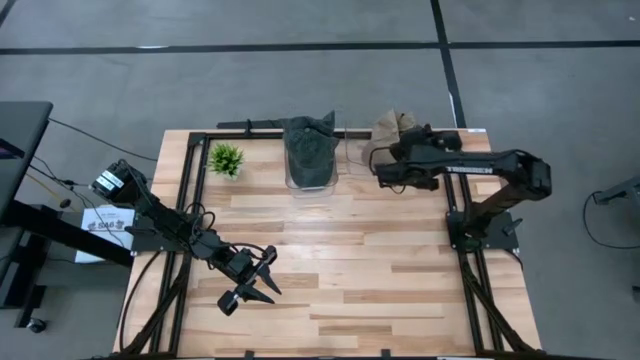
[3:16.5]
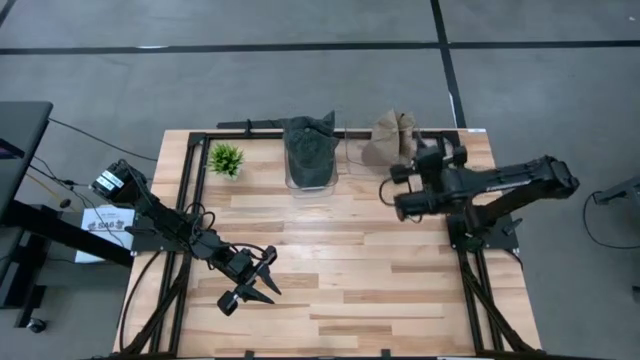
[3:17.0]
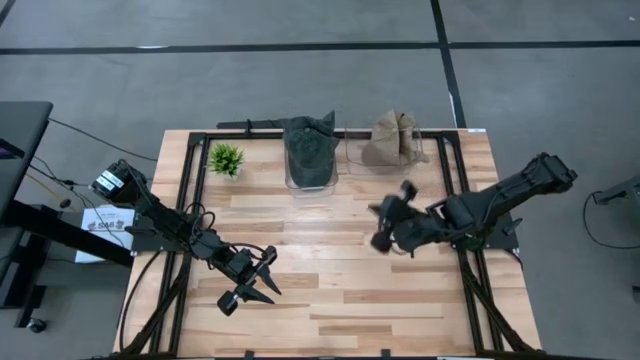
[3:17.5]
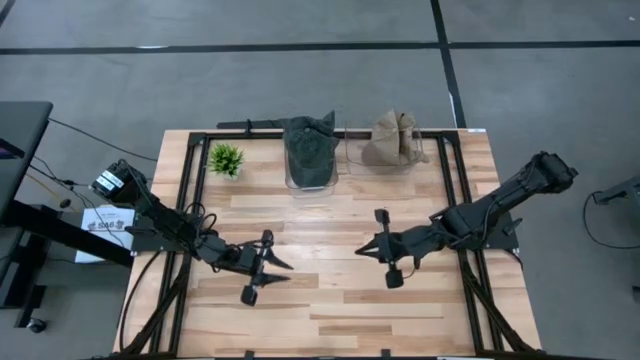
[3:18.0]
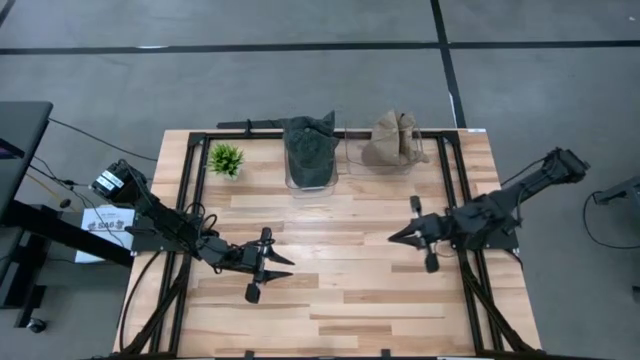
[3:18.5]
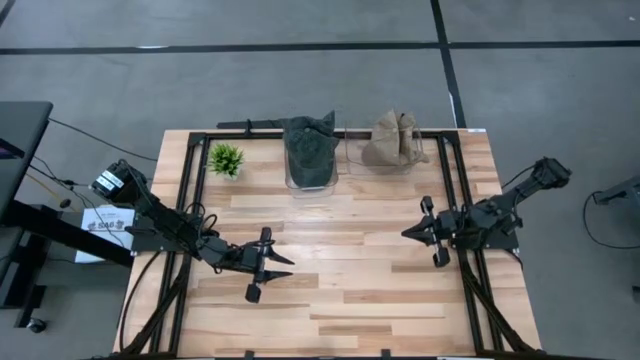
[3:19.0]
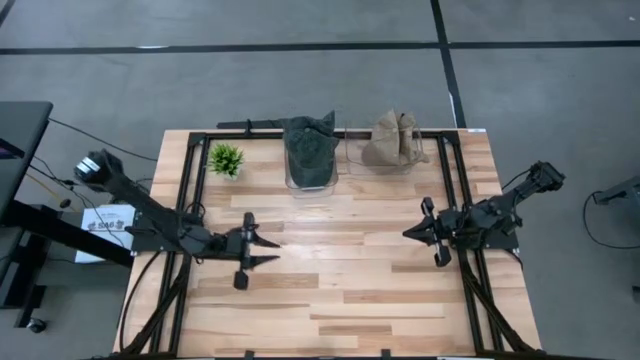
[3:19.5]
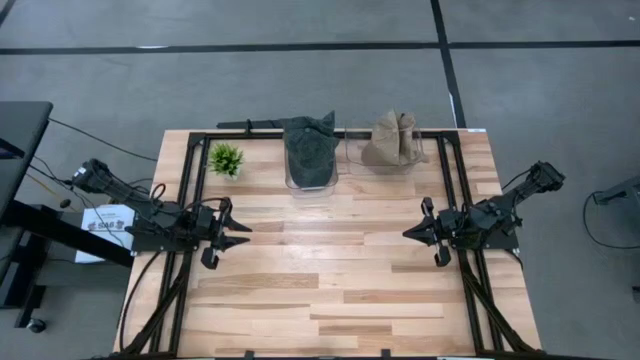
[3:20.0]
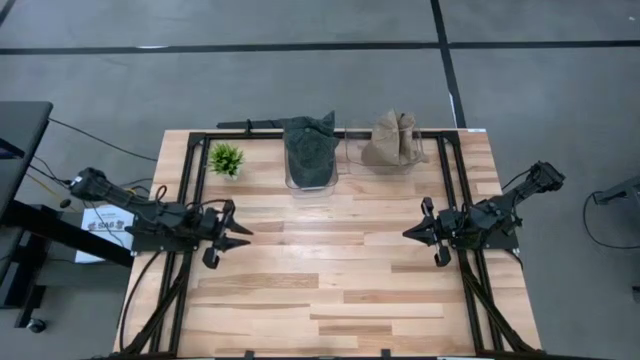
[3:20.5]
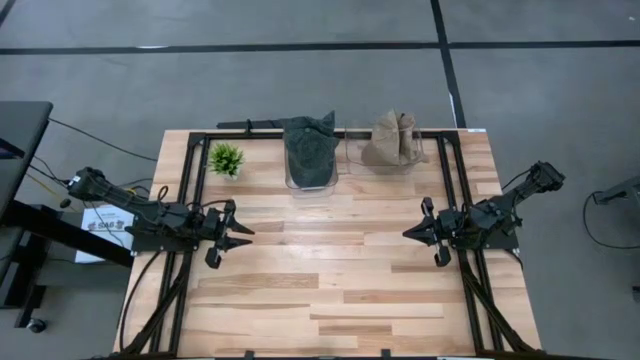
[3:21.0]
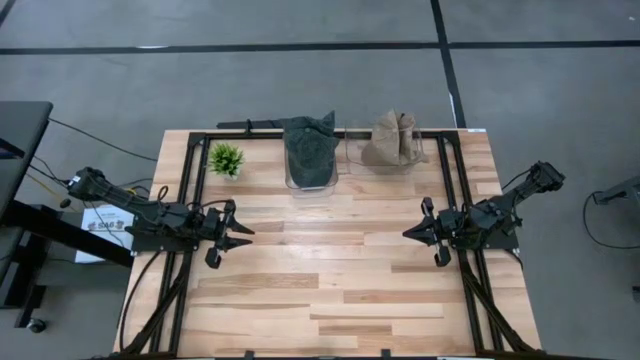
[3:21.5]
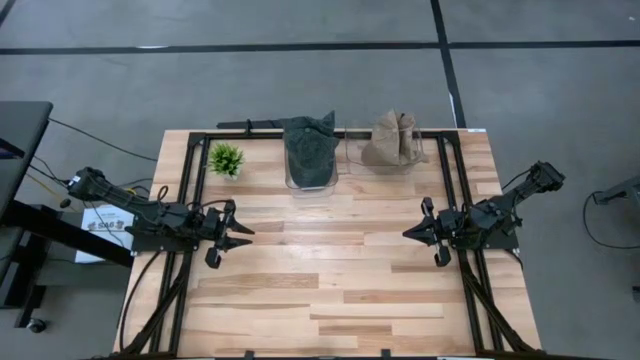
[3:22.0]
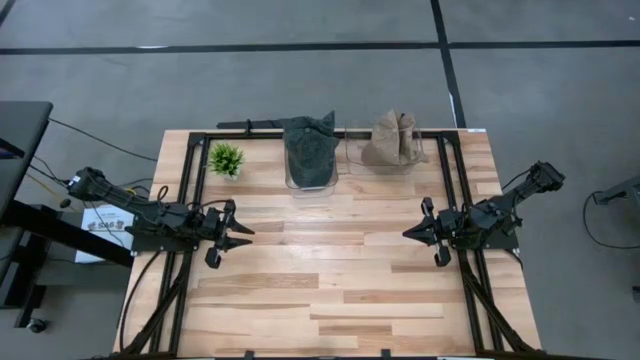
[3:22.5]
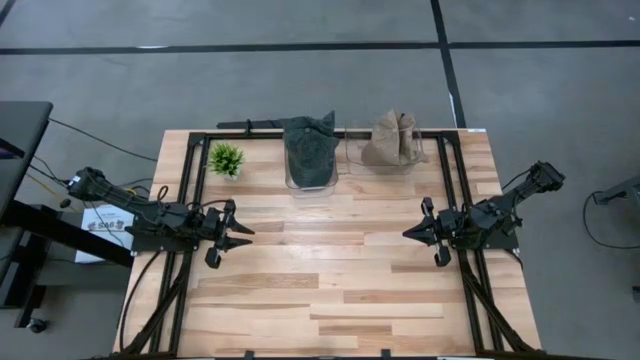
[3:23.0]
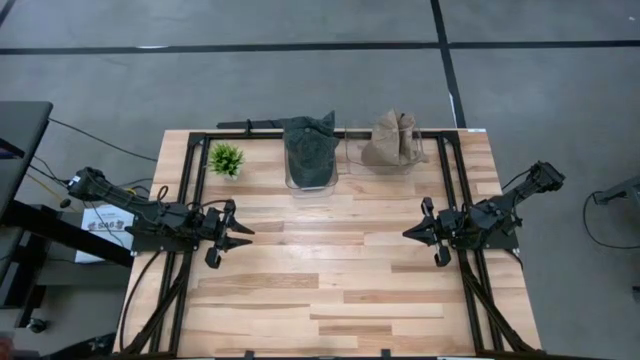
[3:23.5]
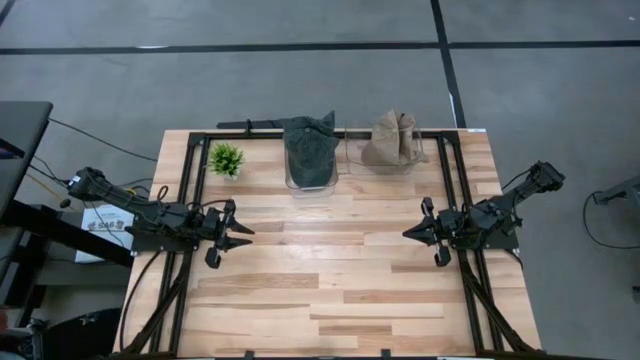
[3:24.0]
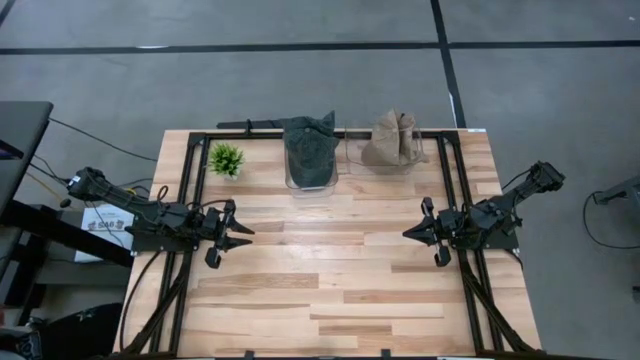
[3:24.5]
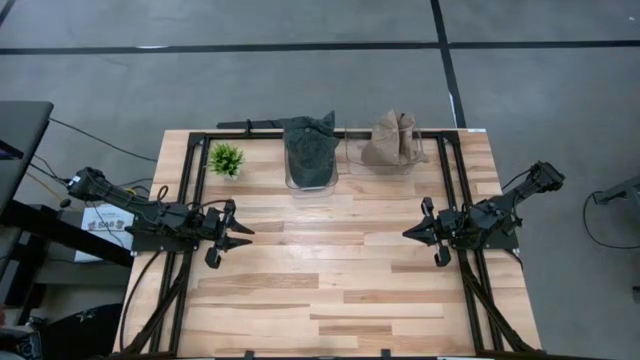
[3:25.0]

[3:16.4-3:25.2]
Task: Pick & Place hat
Return to Home Position

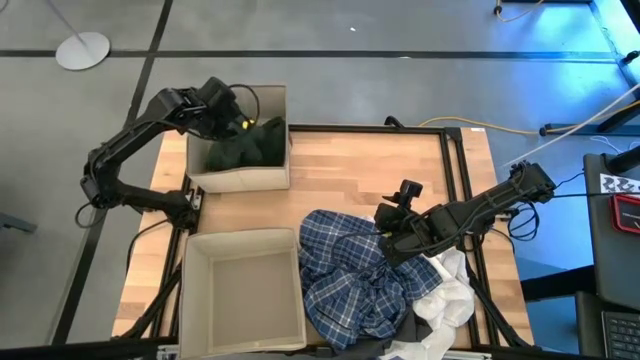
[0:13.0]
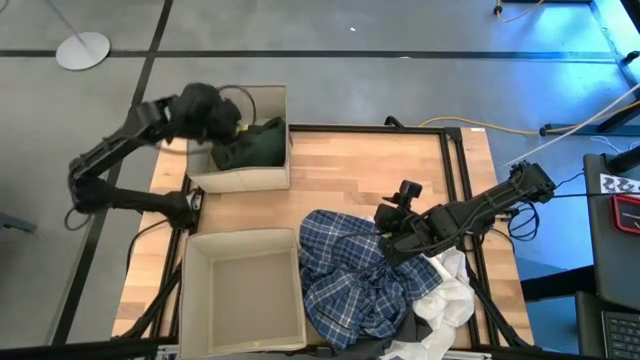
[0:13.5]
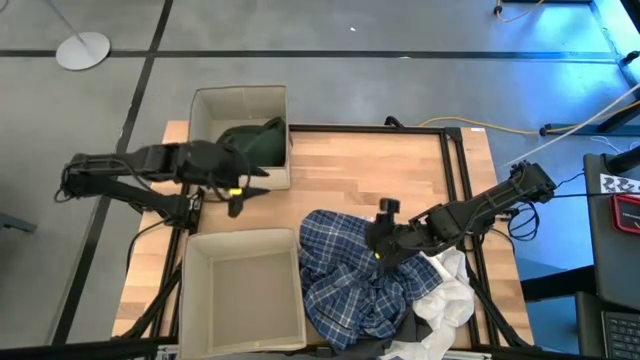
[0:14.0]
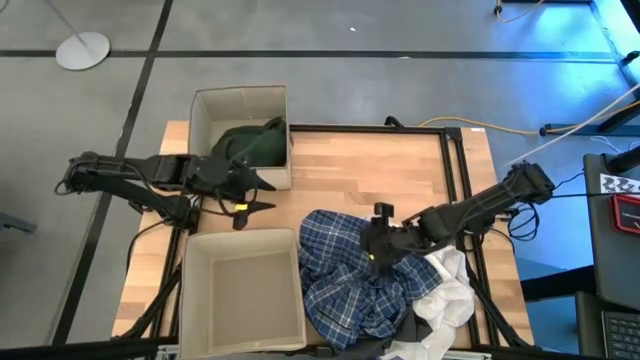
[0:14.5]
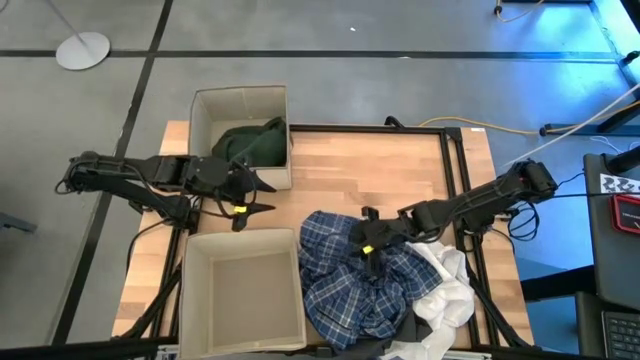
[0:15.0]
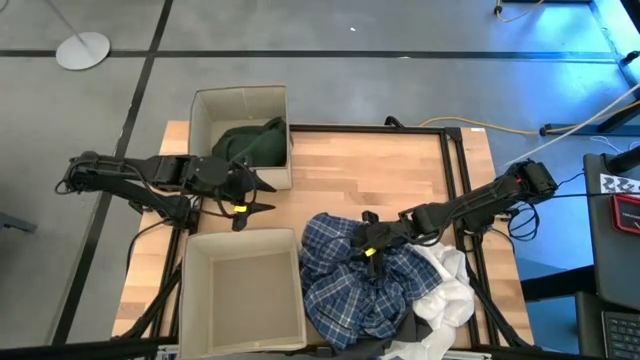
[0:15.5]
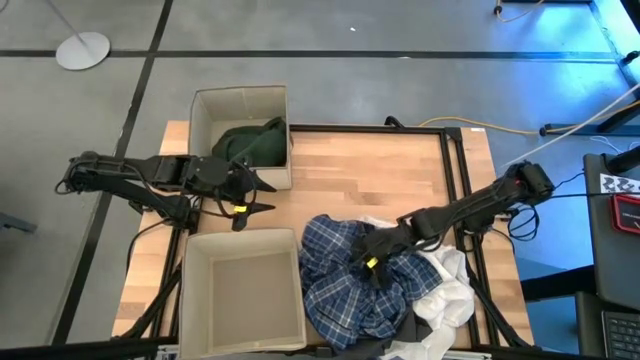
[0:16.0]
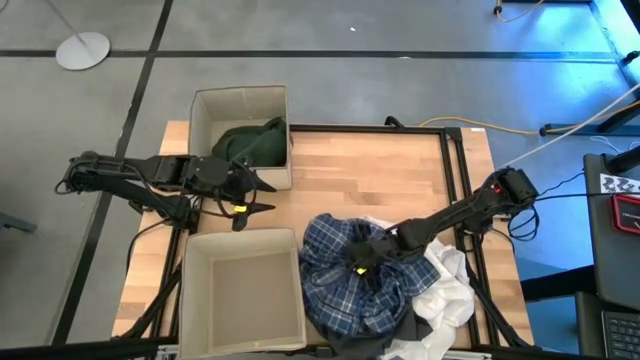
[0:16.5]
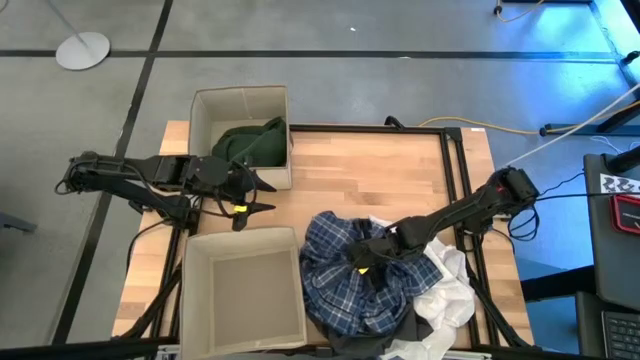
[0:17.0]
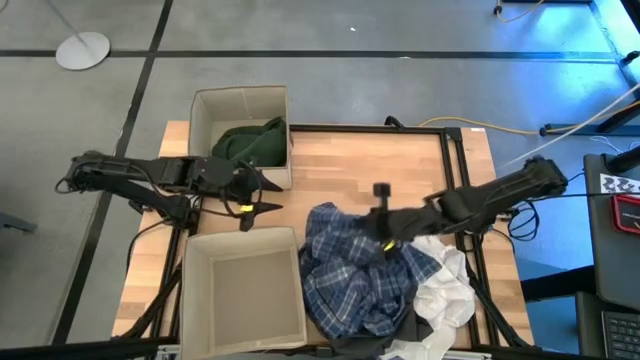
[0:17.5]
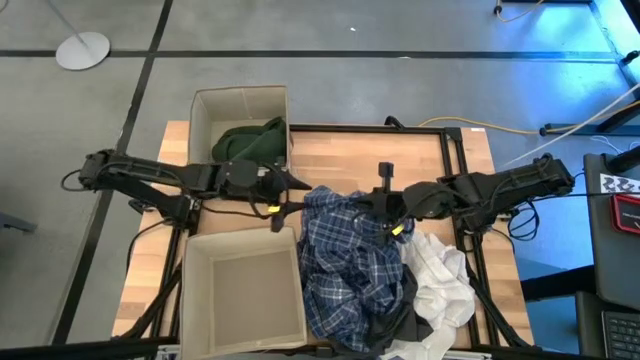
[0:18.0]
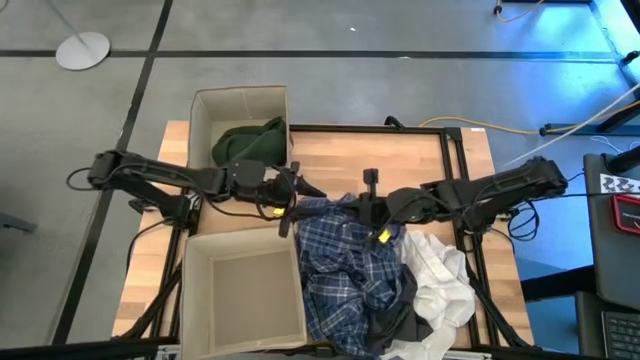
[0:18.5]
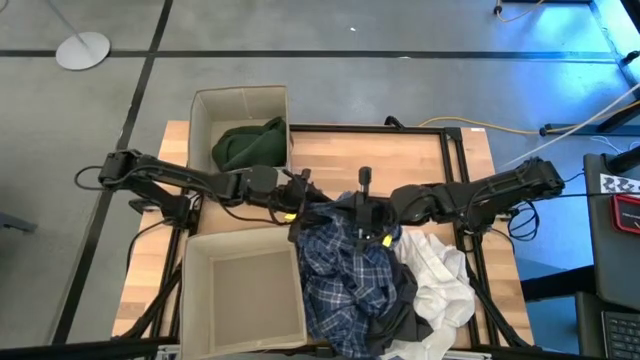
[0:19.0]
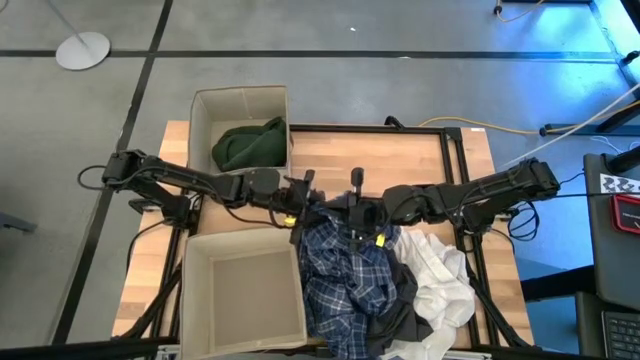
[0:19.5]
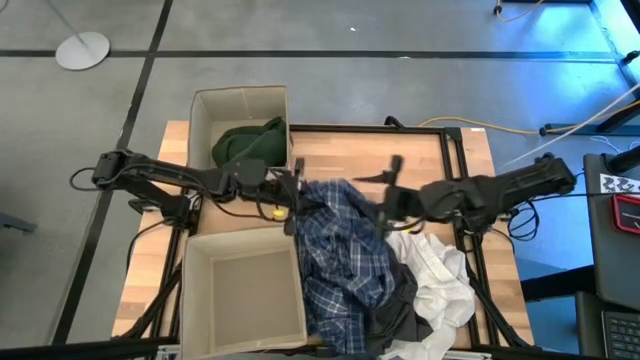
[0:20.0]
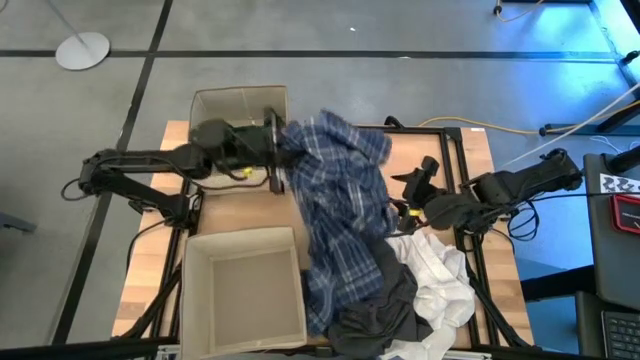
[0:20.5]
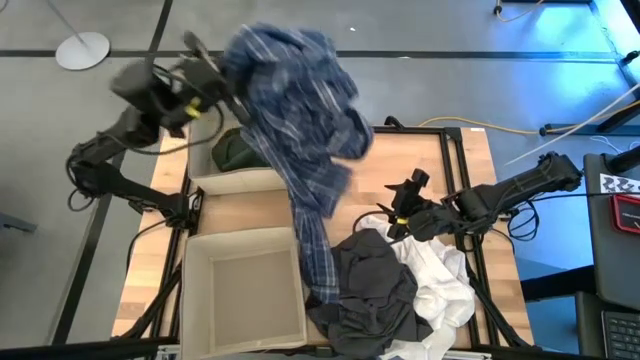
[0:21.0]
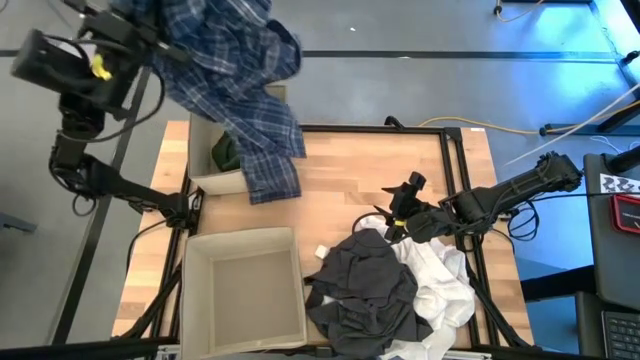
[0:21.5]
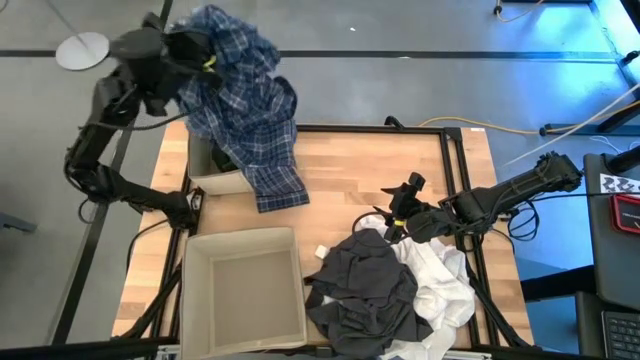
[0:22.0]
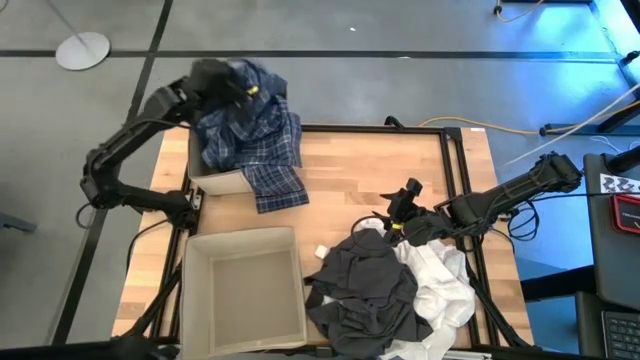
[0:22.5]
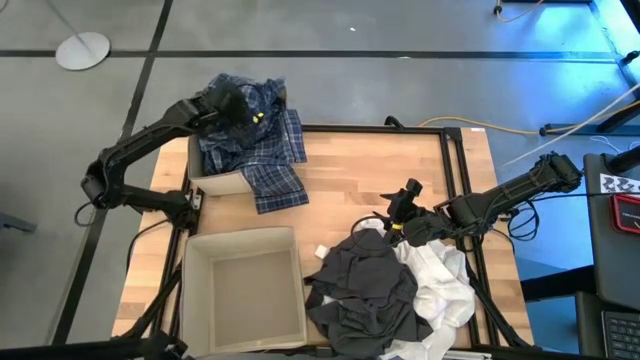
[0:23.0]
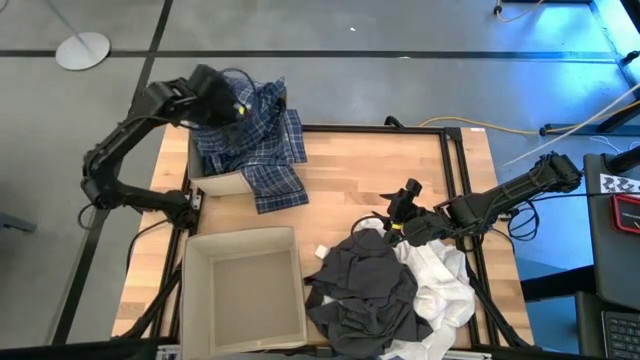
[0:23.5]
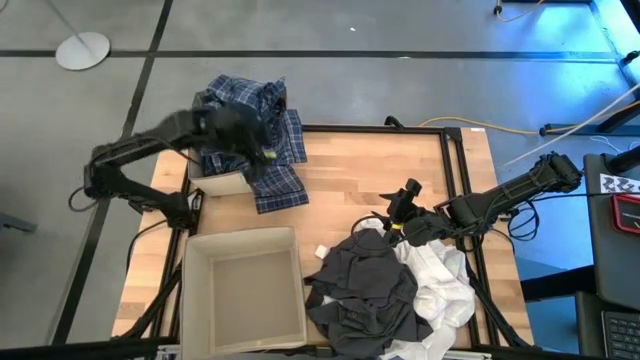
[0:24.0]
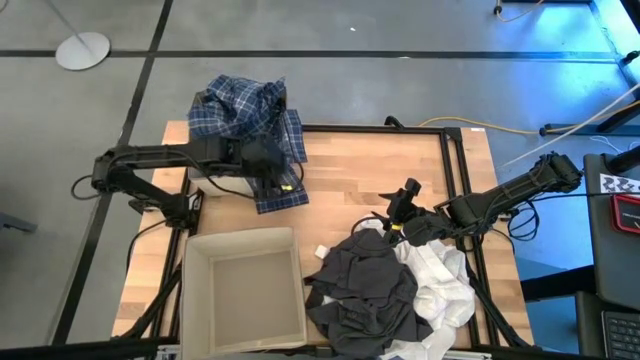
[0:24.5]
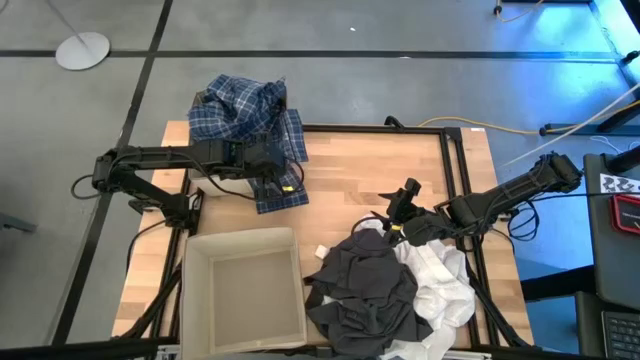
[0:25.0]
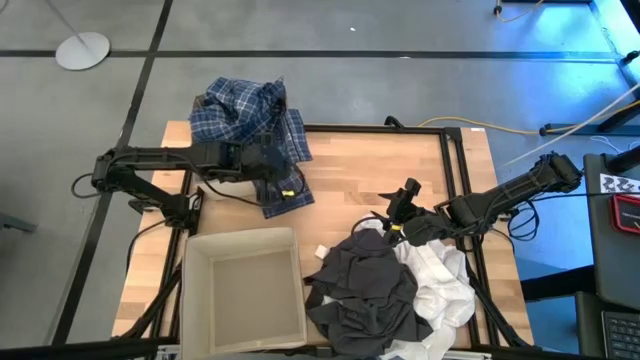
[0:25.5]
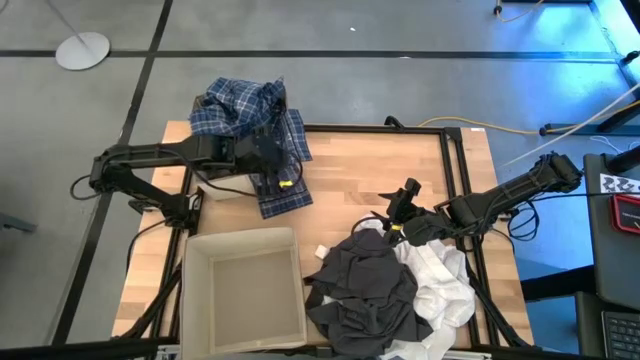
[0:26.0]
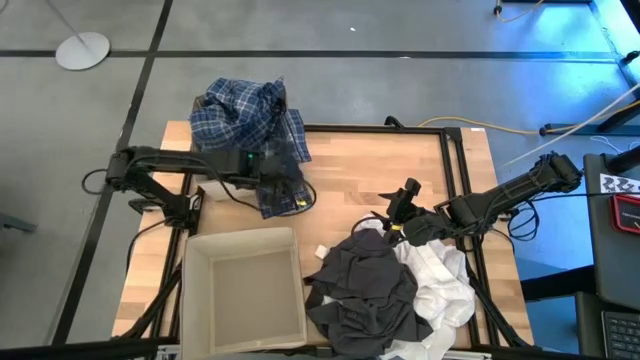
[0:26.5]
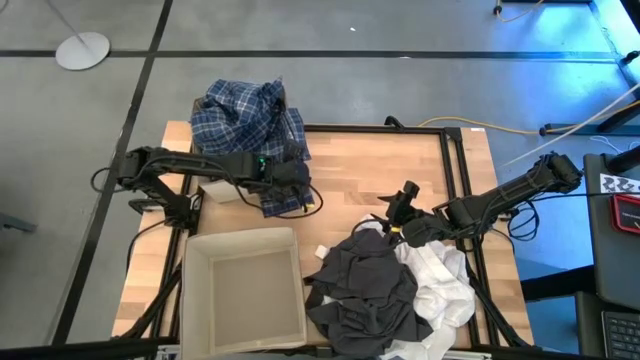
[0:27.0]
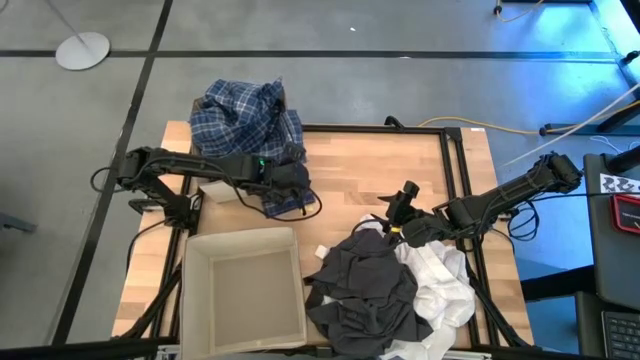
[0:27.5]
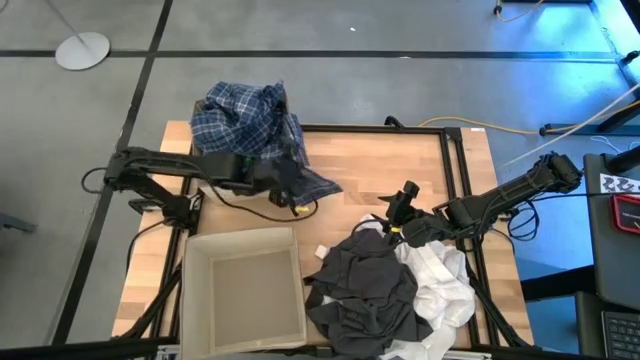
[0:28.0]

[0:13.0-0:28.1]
Task: Sort clothes
Put the blue long sleeve shirt into the top laundry organizer
